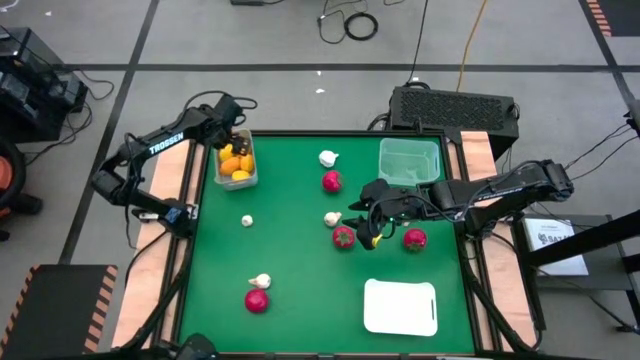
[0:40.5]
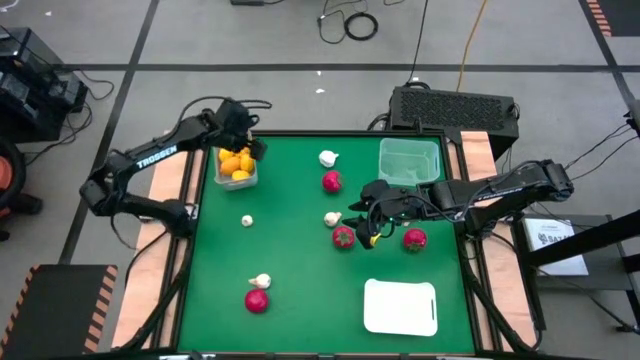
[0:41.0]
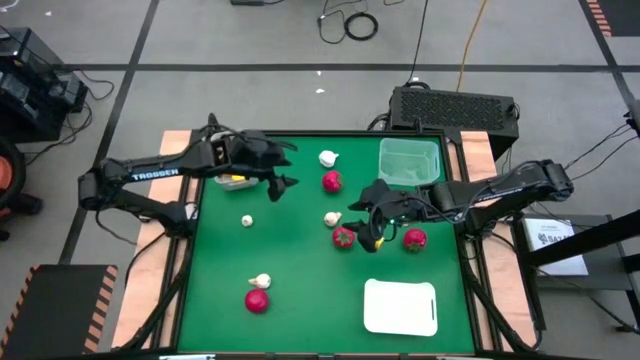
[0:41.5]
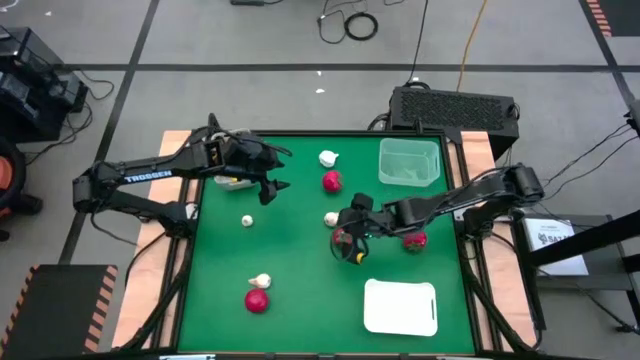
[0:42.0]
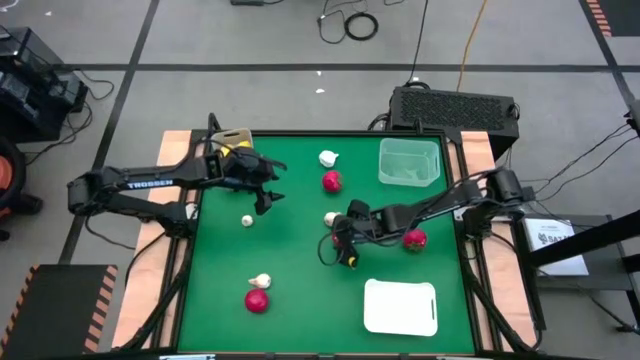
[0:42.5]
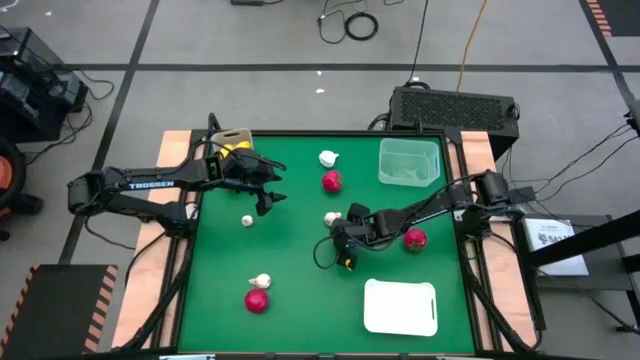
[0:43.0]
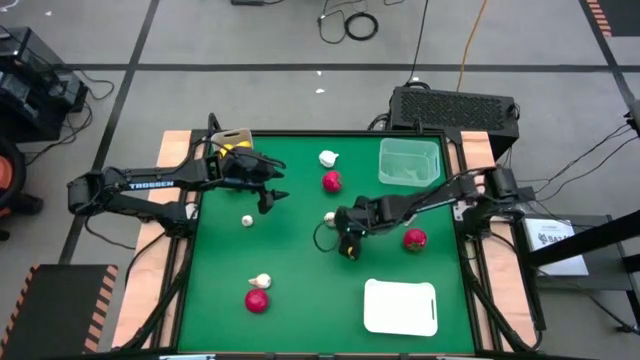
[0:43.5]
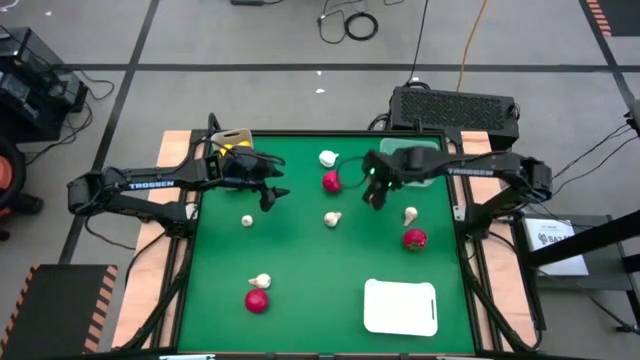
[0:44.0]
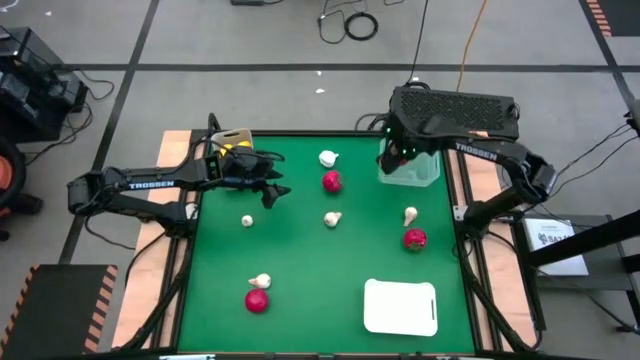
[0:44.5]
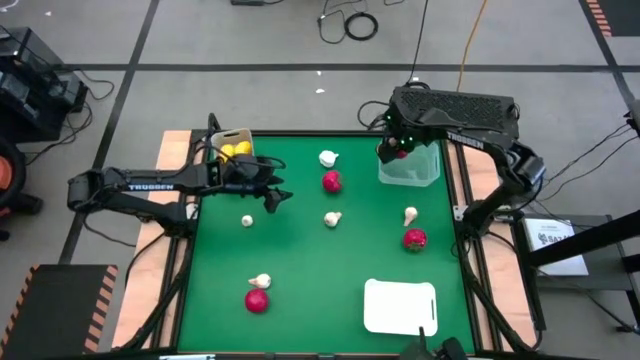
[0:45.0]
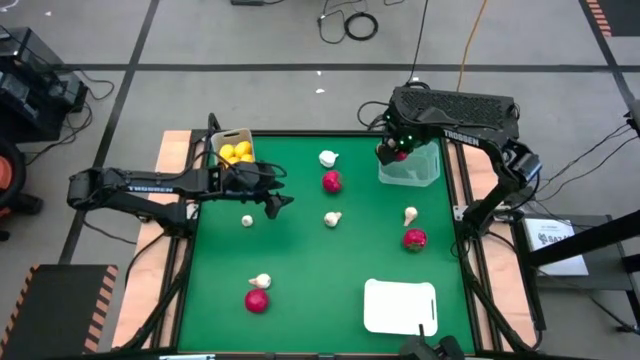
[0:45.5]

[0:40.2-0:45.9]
Task: Sort produce into baskets
Put the red tomato in the transparent bin

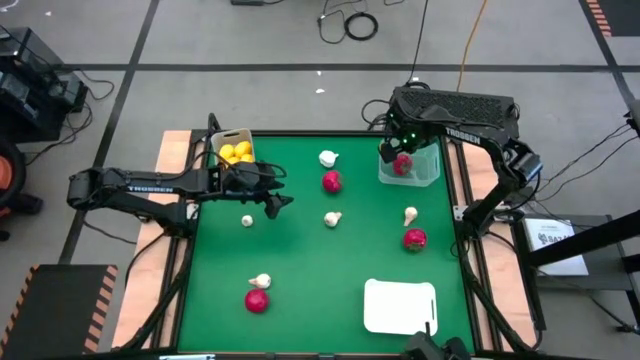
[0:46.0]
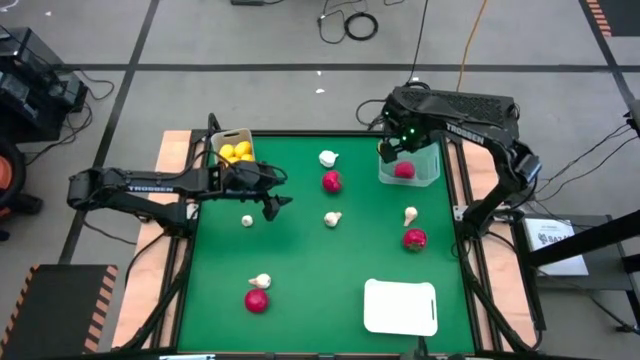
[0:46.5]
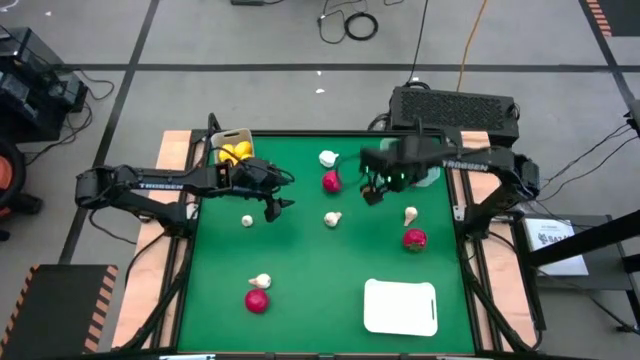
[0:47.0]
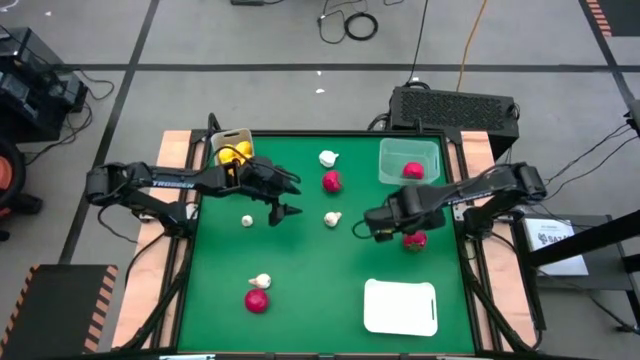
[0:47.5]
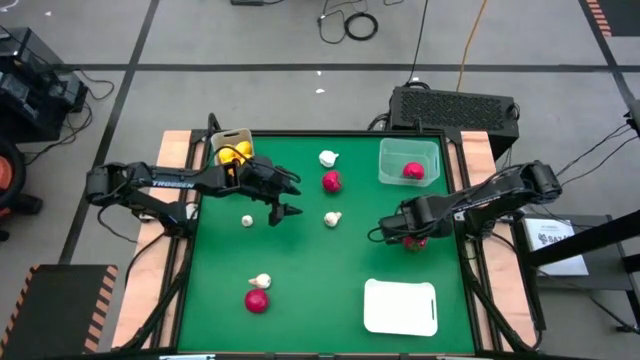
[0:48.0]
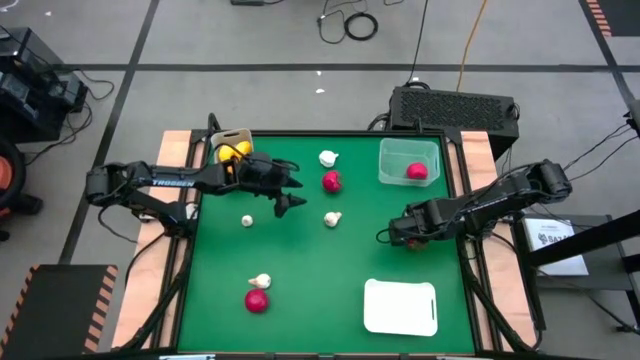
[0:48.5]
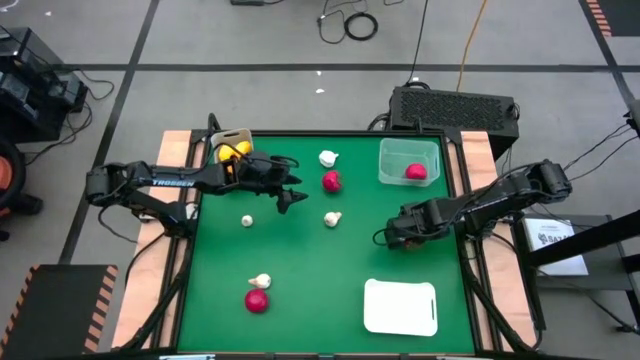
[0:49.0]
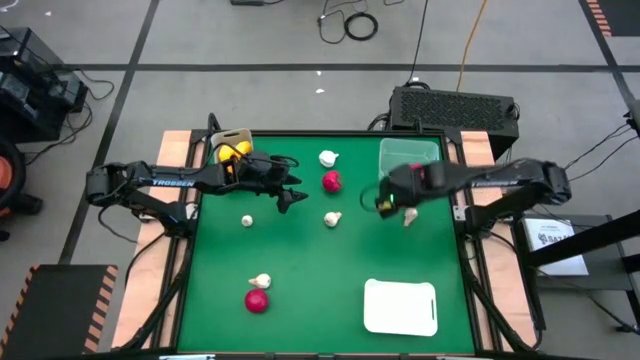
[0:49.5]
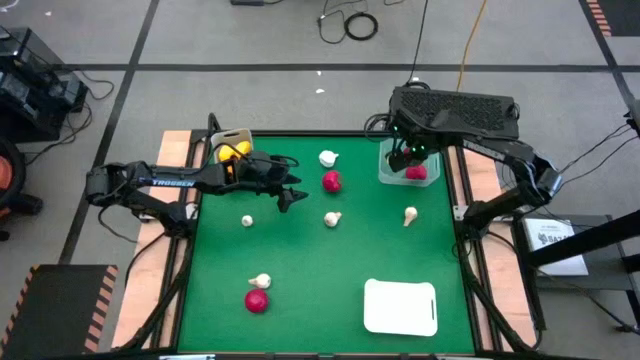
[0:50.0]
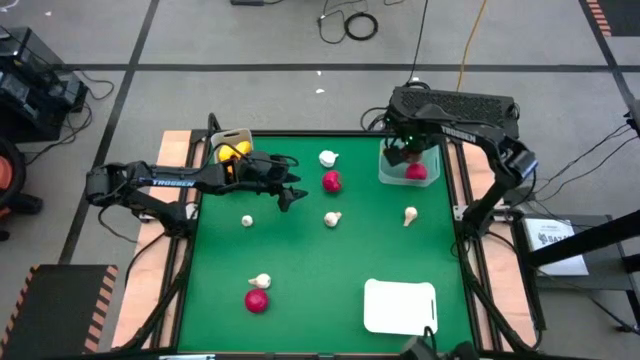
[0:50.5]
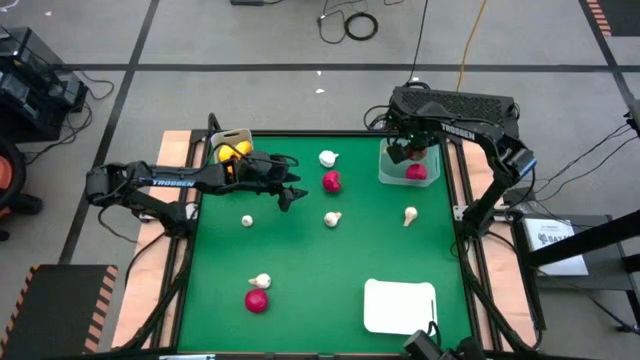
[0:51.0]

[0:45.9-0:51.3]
Put the red tomato in the transparent bin

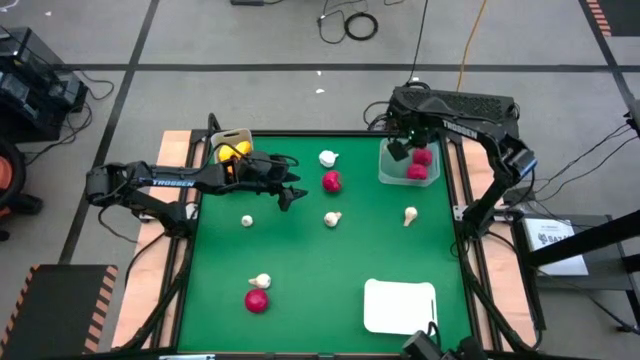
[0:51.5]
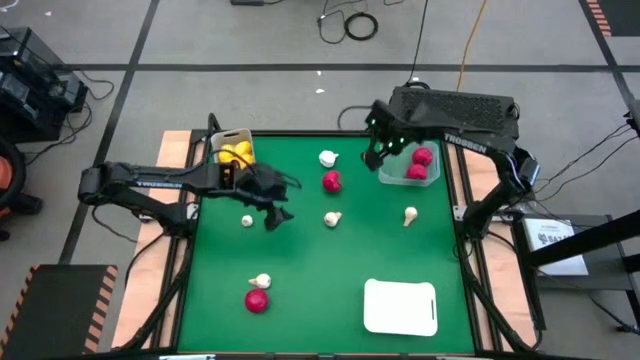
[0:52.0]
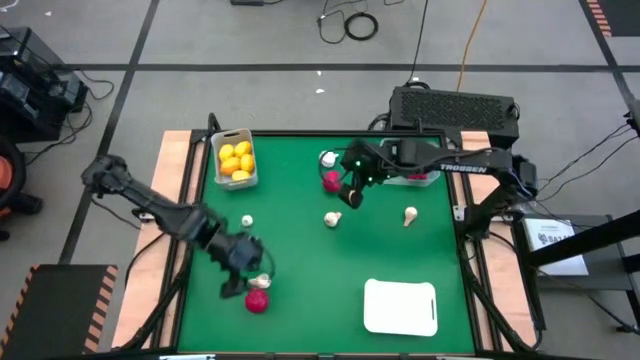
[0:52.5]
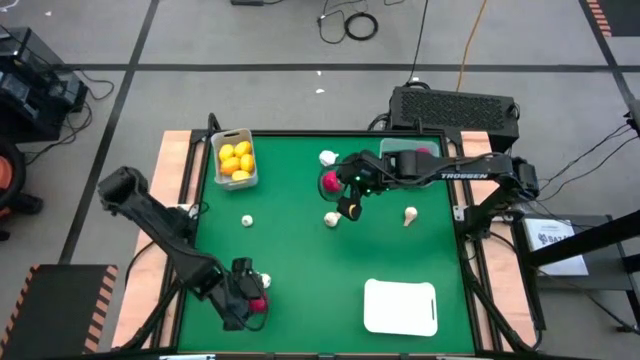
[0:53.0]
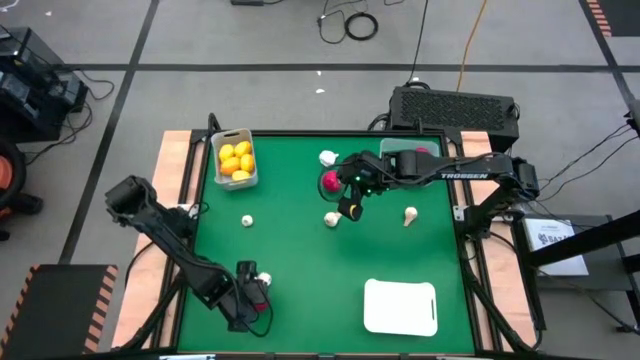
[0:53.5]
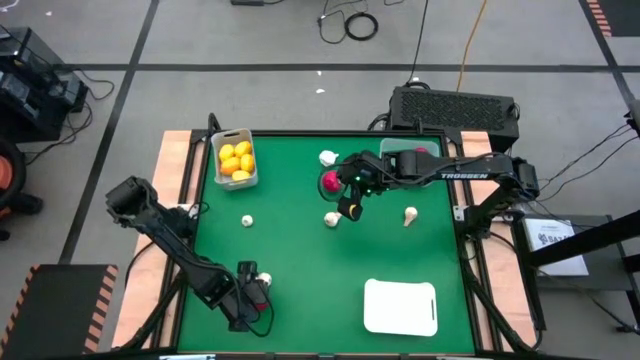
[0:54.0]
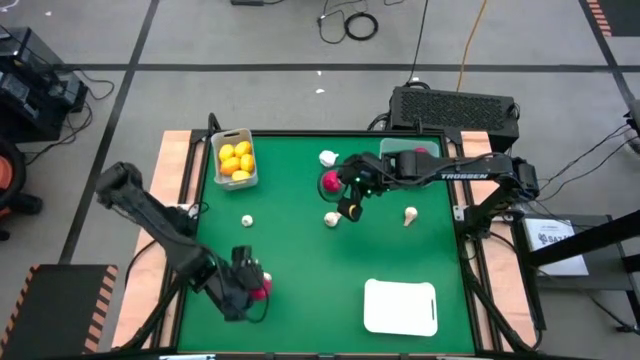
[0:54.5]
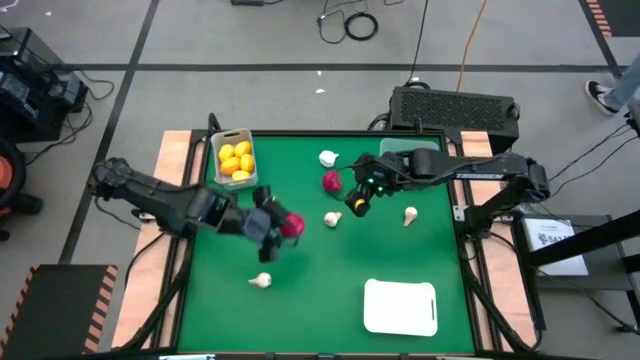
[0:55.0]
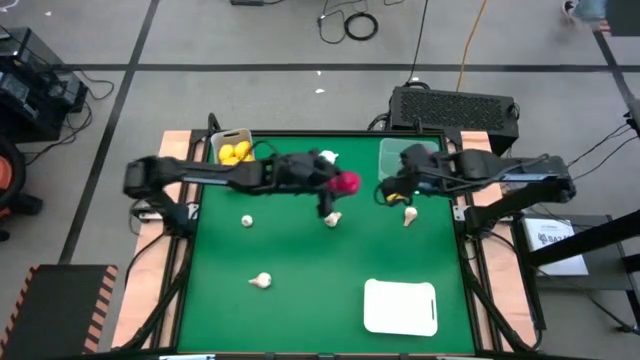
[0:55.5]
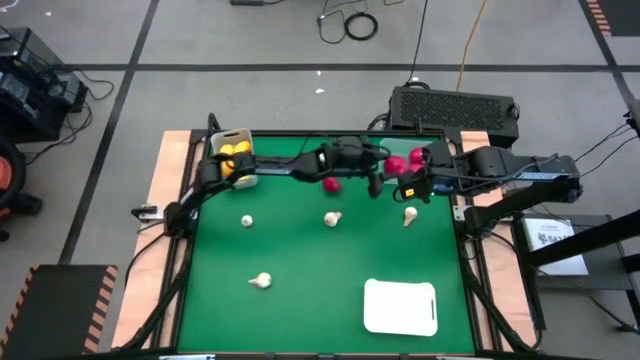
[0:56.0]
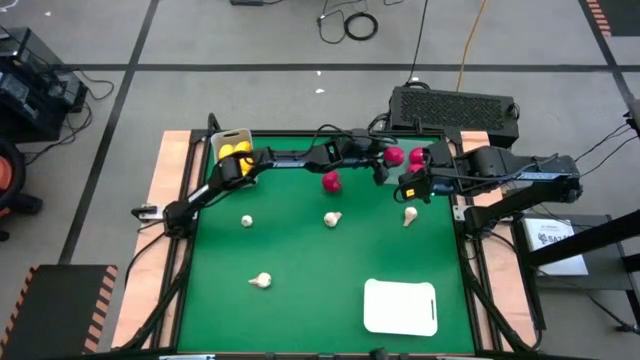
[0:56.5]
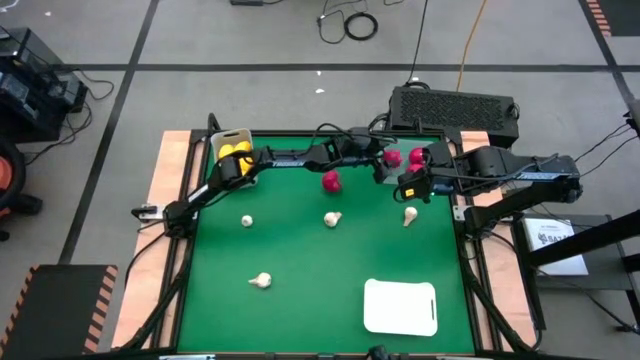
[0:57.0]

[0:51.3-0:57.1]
Put the red tomato in the transparent bin

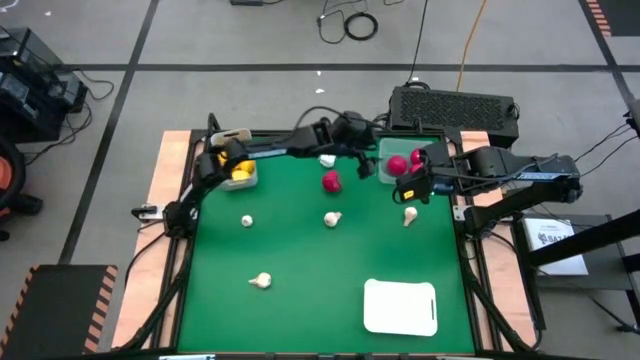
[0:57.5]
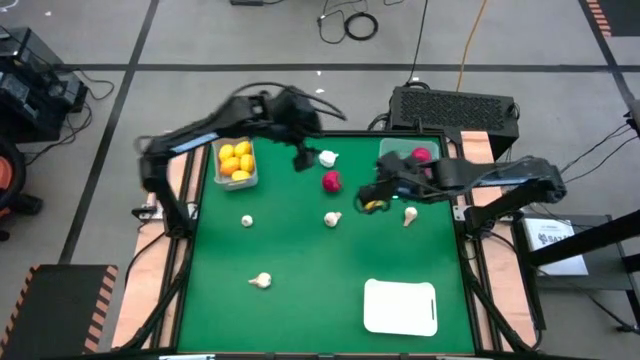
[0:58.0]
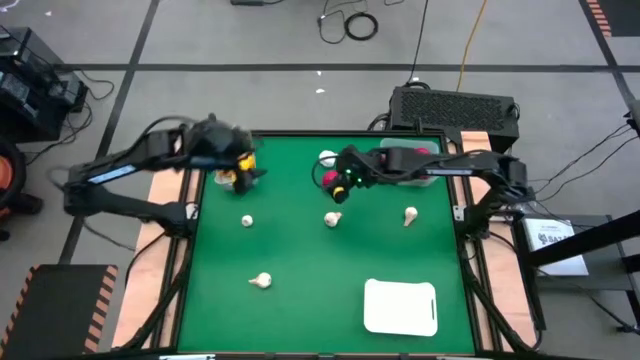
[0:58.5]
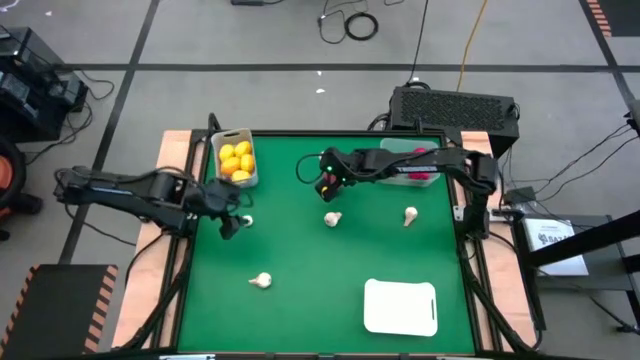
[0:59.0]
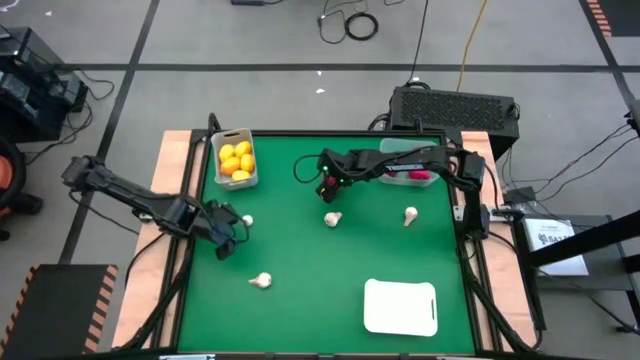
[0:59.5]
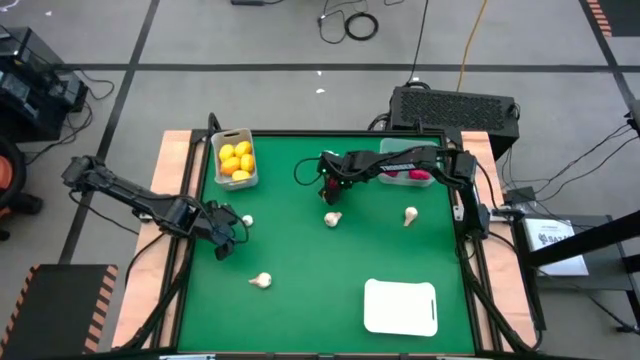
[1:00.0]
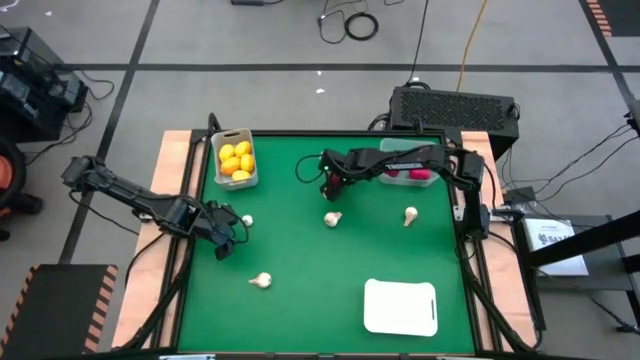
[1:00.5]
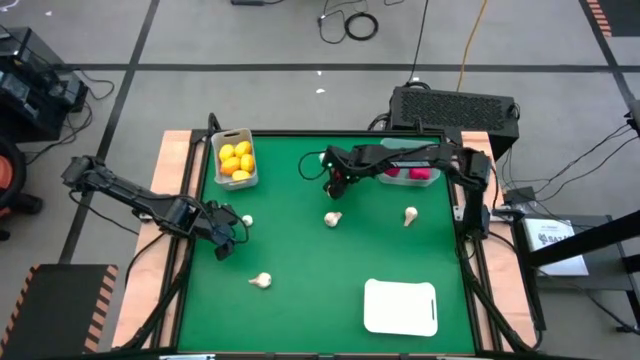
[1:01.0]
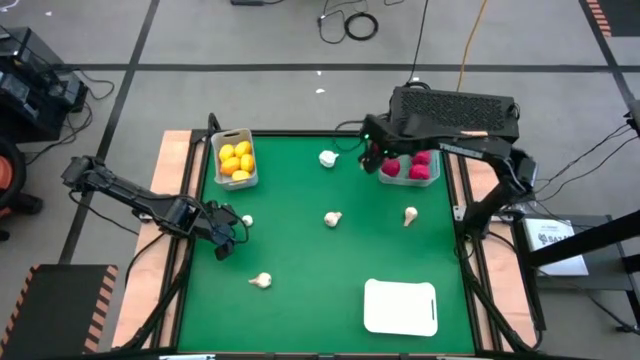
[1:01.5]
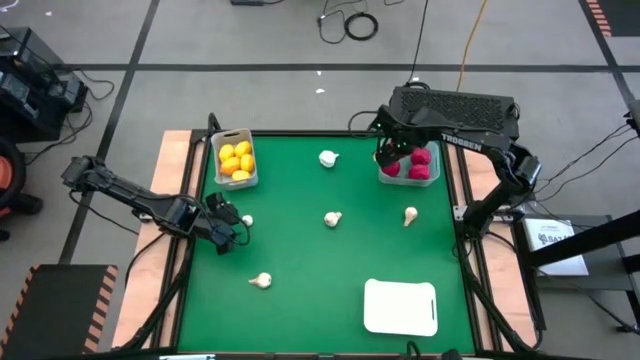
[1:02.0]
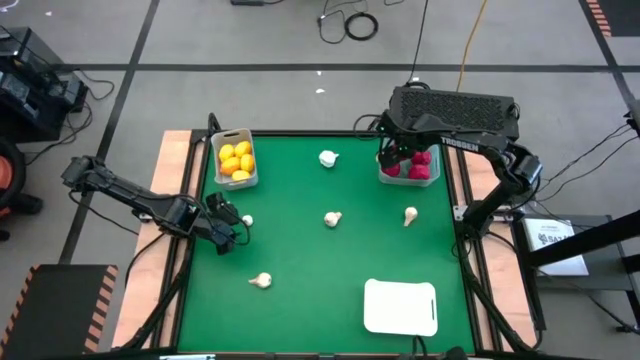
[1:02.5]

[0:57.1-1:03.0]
Put the red tomato in the transparent bin
